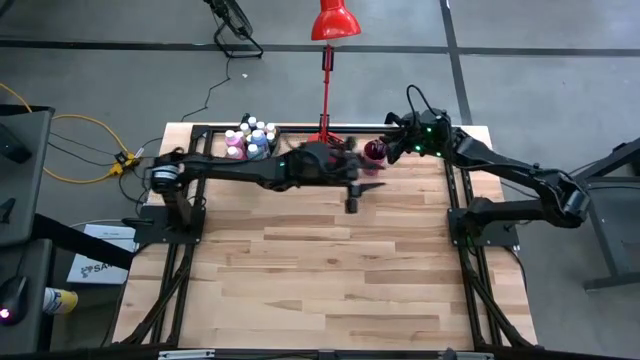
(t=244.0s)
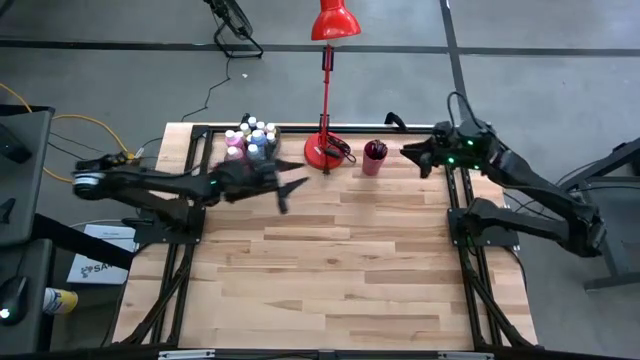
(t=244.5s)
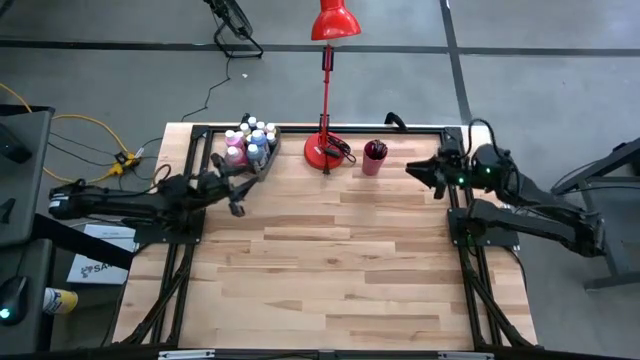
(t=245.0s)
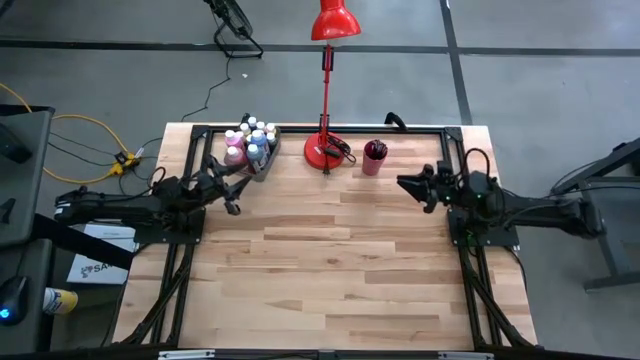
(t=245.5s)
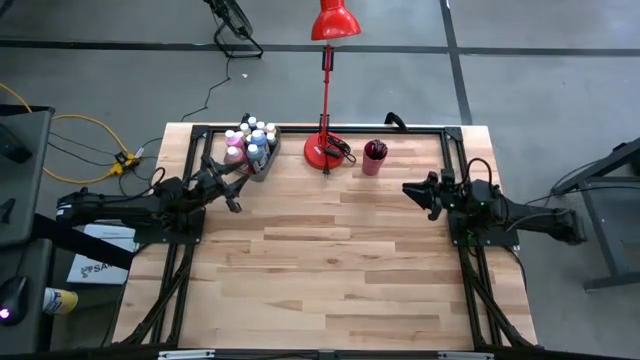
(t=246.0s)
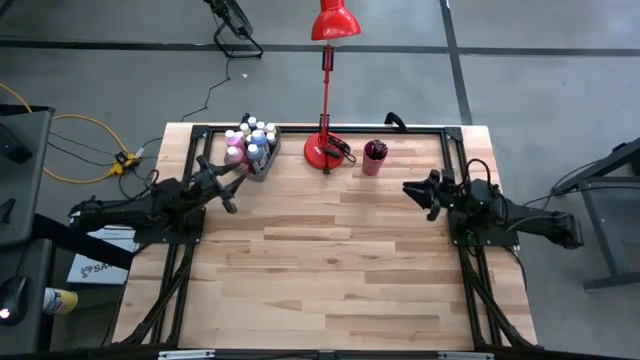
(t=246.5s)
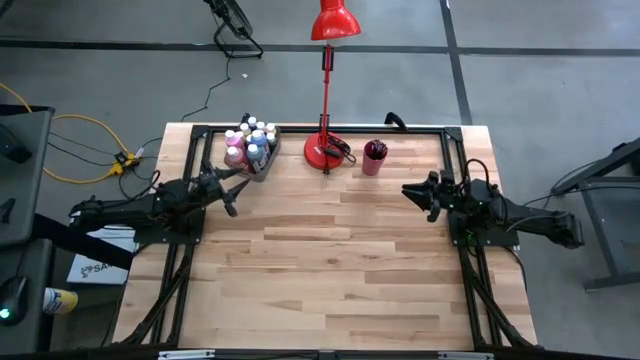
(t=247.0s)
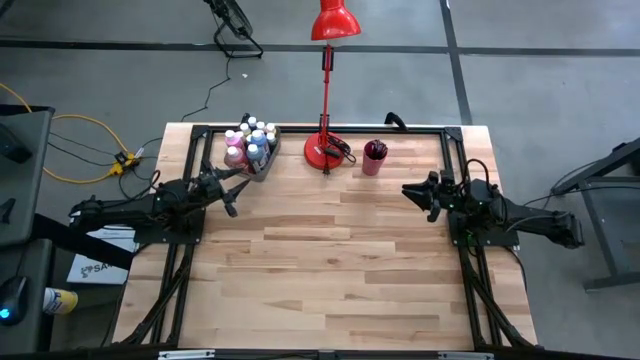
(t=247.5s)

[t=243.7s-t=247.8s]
Task: Pick & Place Paint Supplies
Return to Home Position

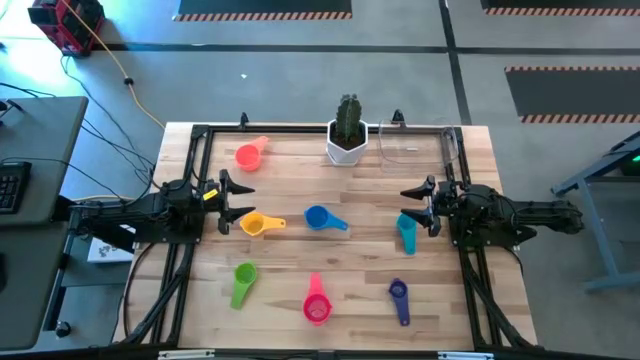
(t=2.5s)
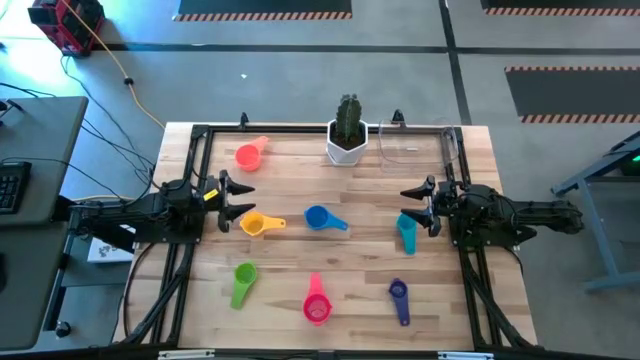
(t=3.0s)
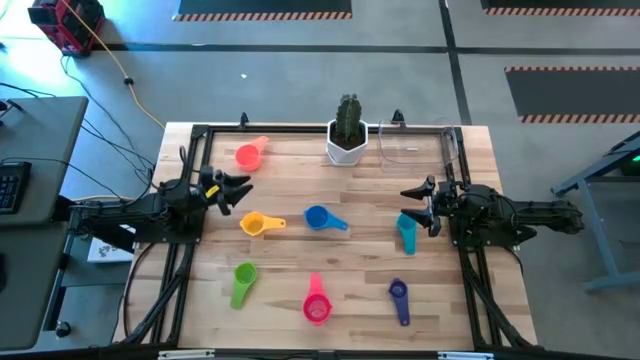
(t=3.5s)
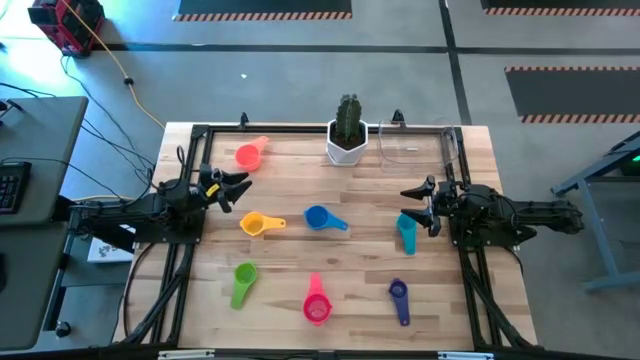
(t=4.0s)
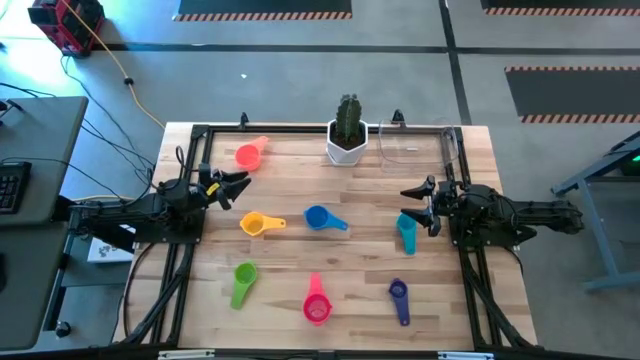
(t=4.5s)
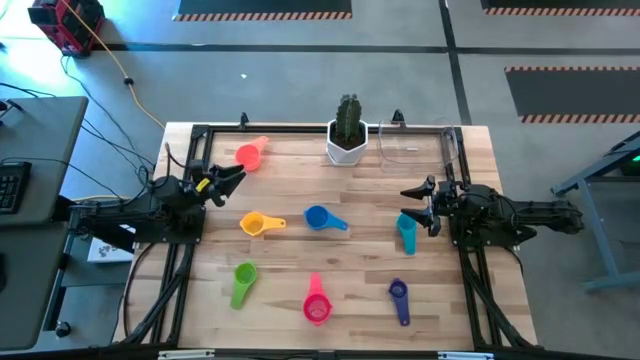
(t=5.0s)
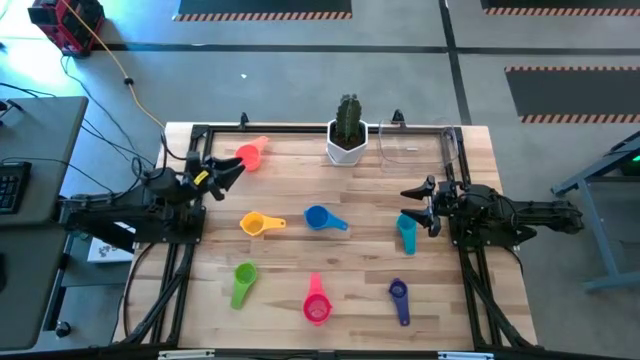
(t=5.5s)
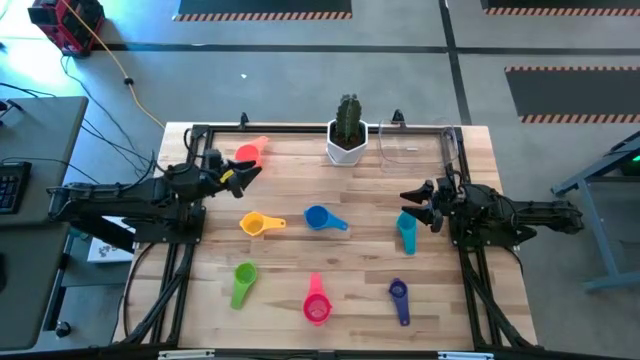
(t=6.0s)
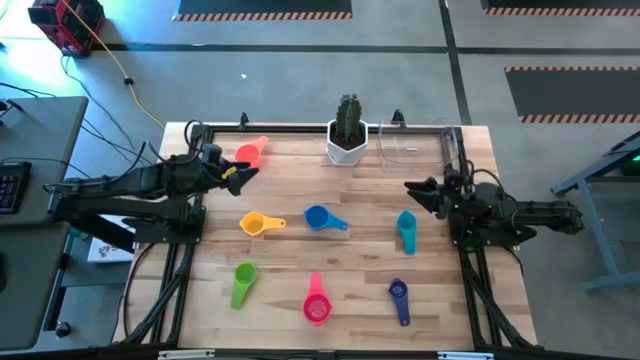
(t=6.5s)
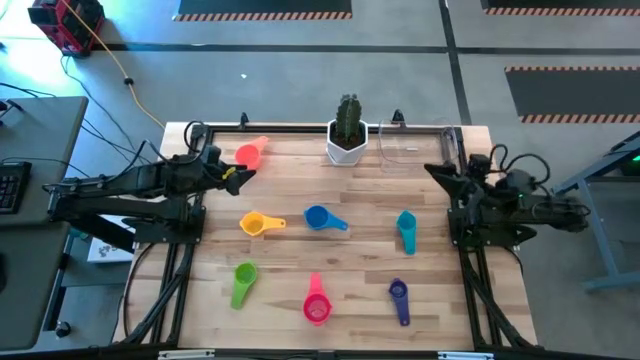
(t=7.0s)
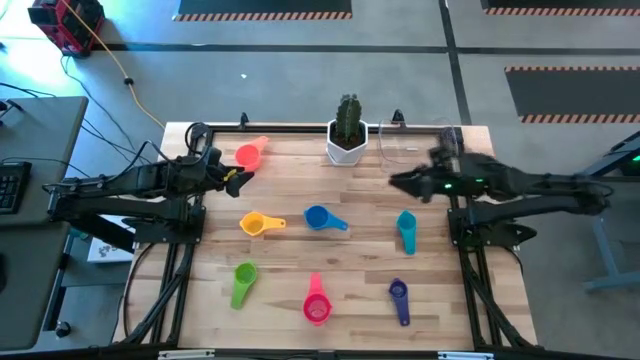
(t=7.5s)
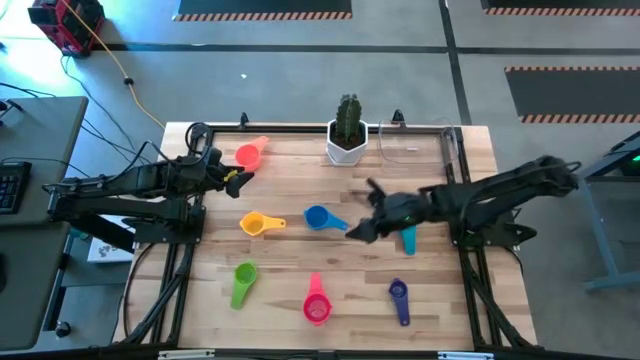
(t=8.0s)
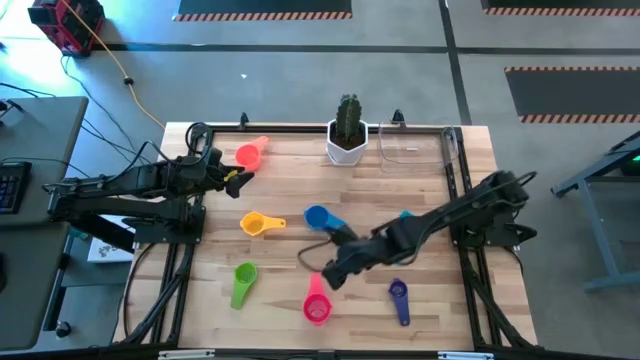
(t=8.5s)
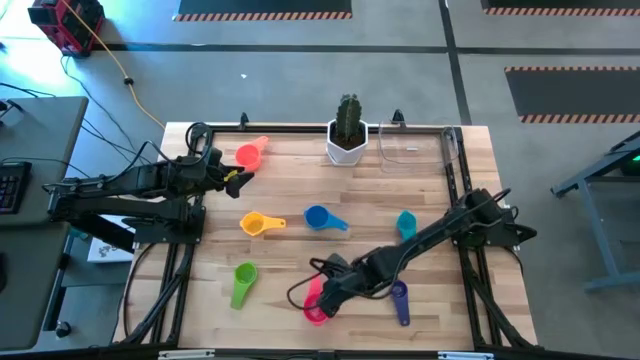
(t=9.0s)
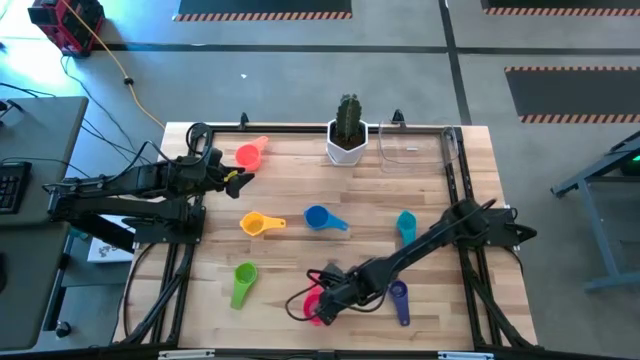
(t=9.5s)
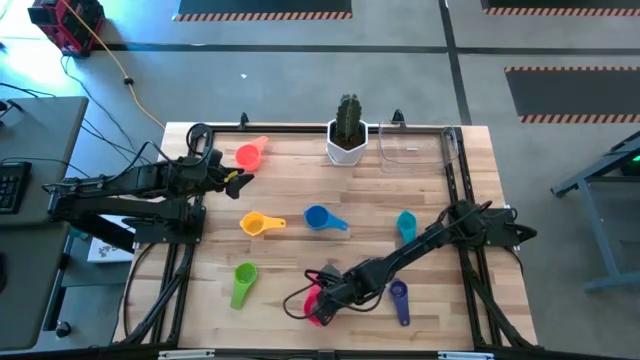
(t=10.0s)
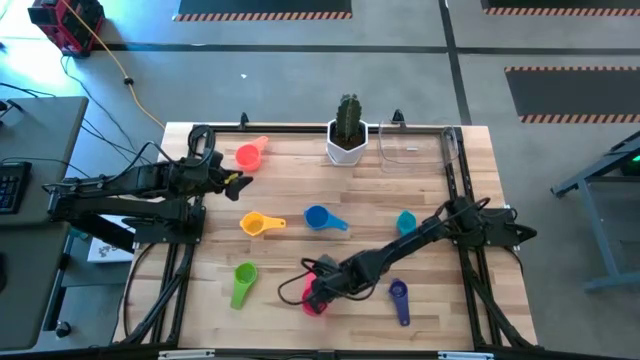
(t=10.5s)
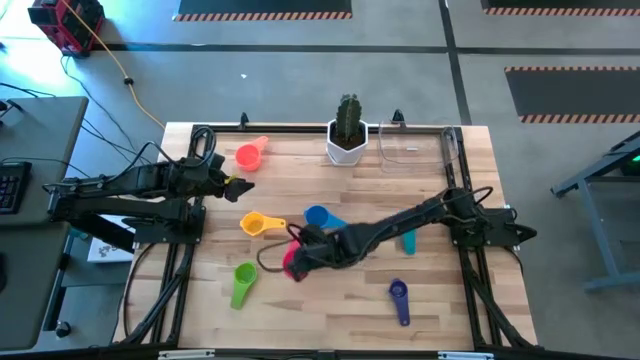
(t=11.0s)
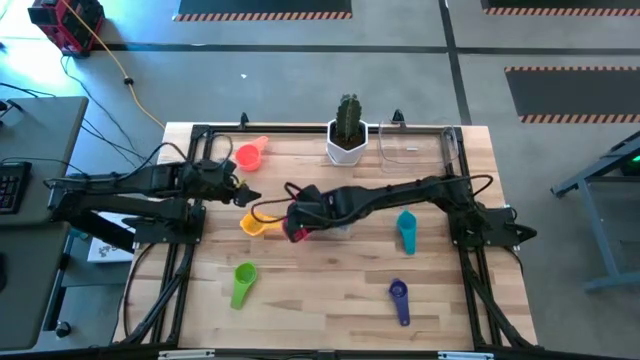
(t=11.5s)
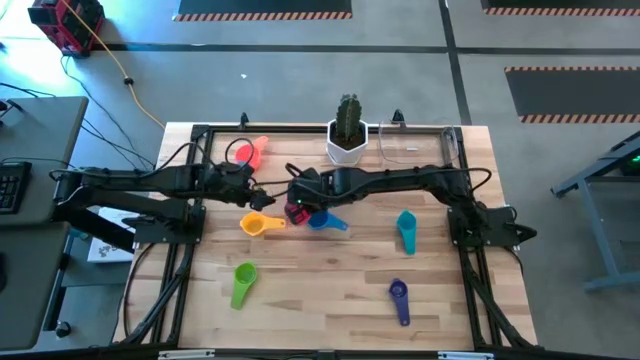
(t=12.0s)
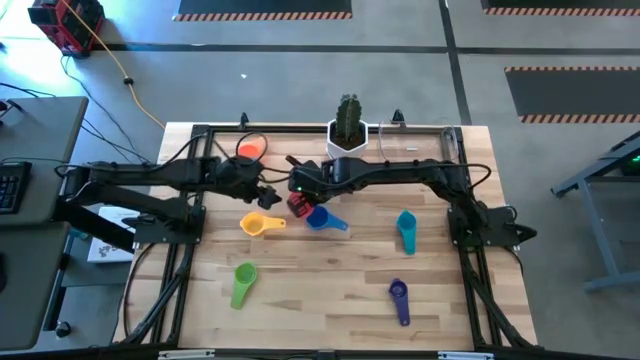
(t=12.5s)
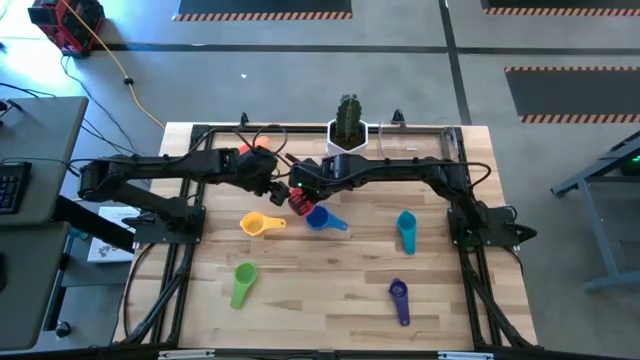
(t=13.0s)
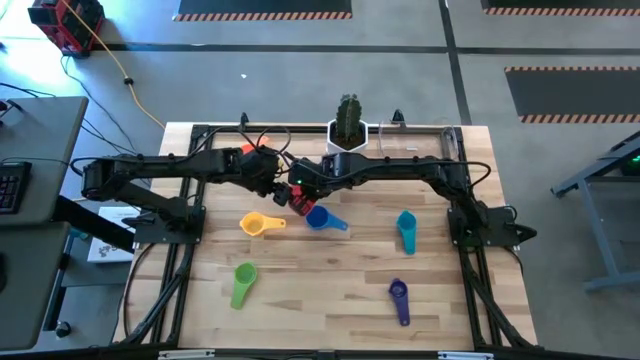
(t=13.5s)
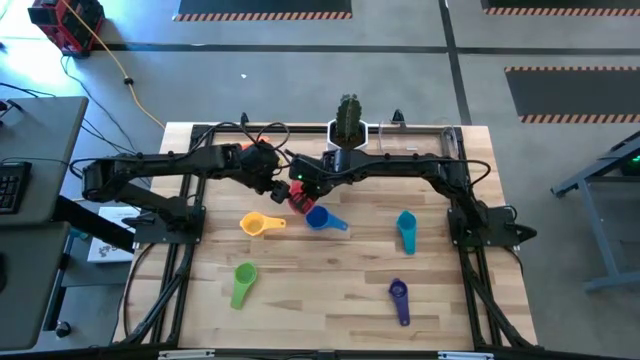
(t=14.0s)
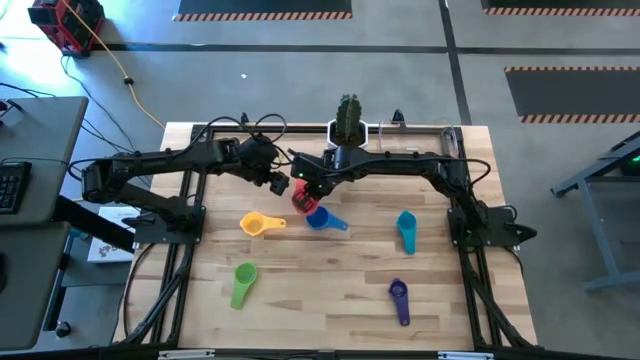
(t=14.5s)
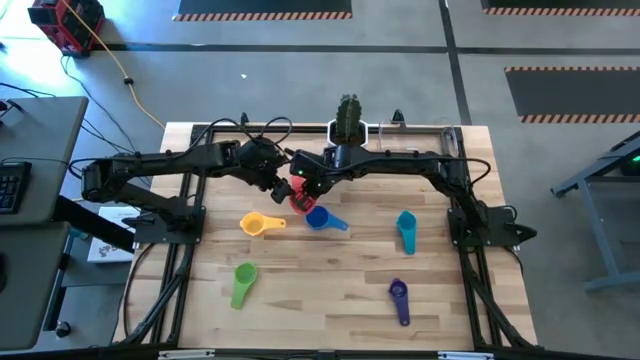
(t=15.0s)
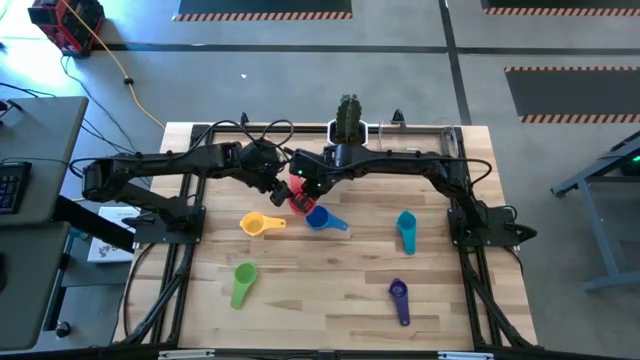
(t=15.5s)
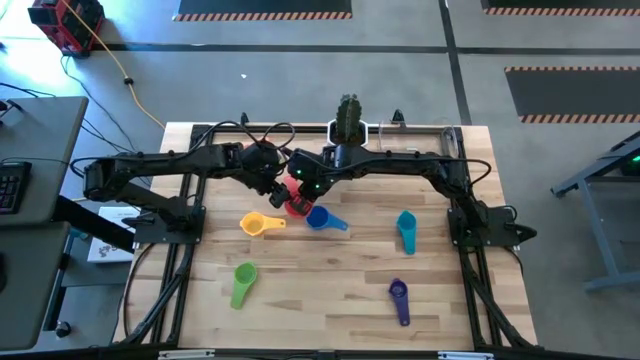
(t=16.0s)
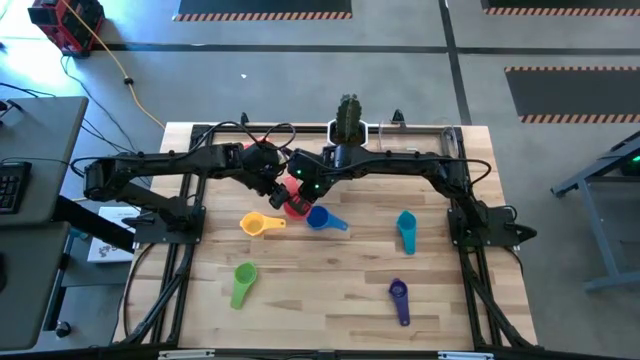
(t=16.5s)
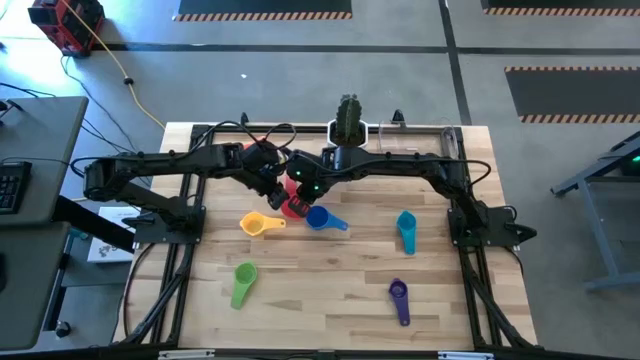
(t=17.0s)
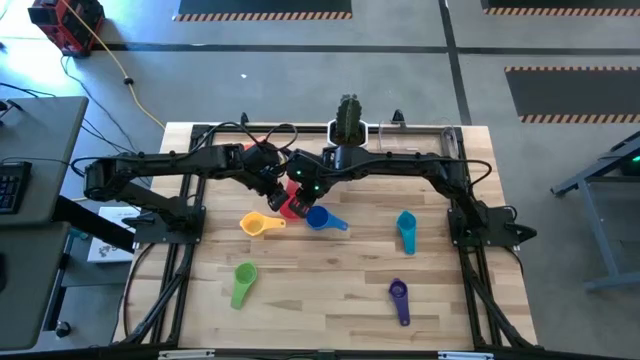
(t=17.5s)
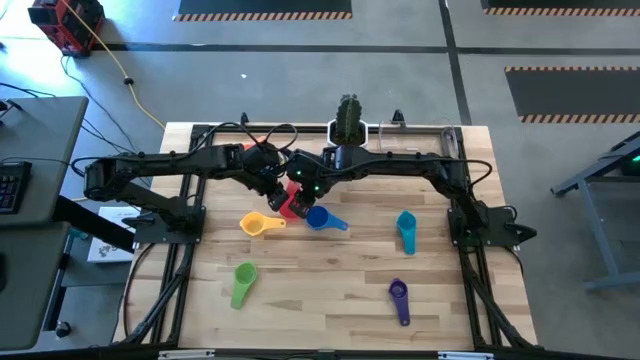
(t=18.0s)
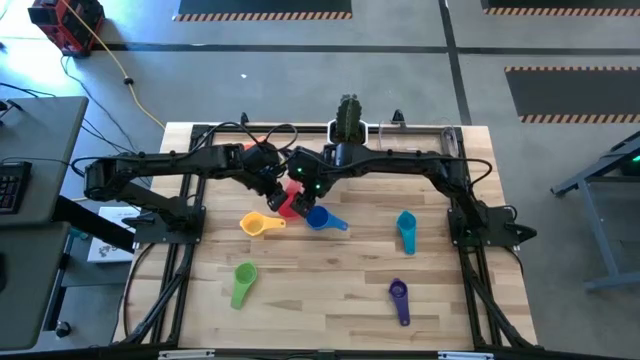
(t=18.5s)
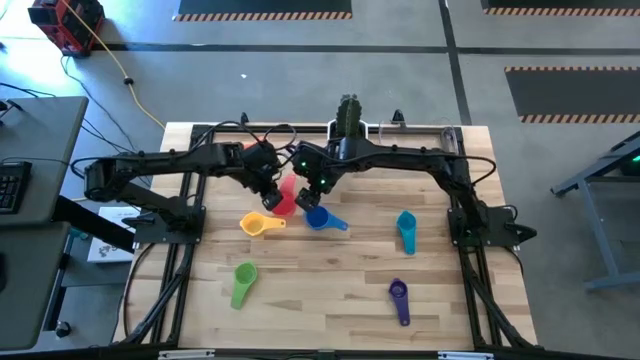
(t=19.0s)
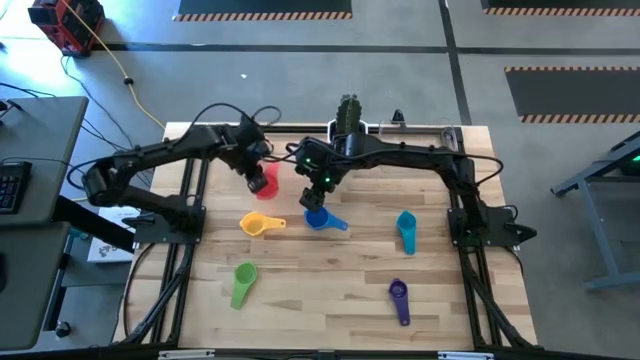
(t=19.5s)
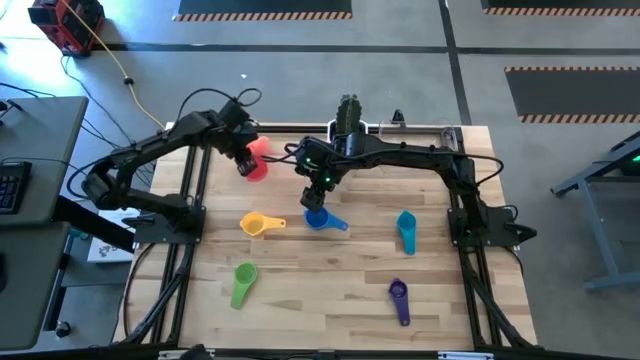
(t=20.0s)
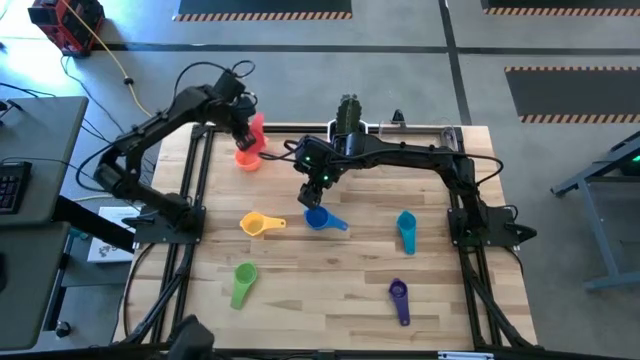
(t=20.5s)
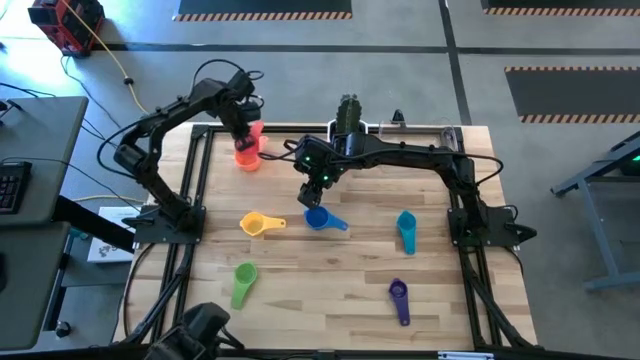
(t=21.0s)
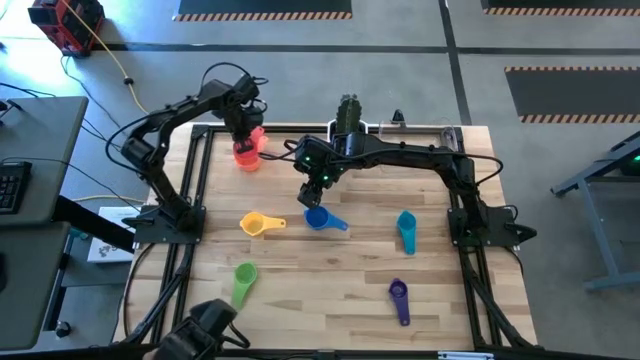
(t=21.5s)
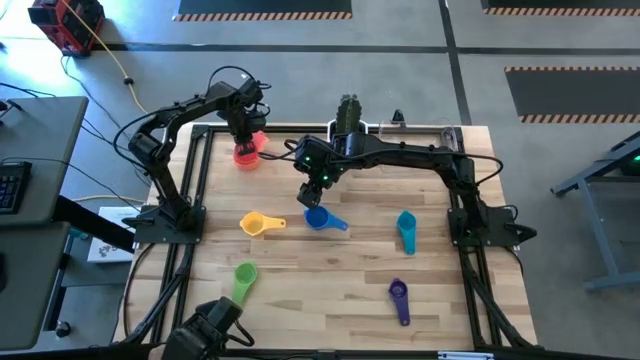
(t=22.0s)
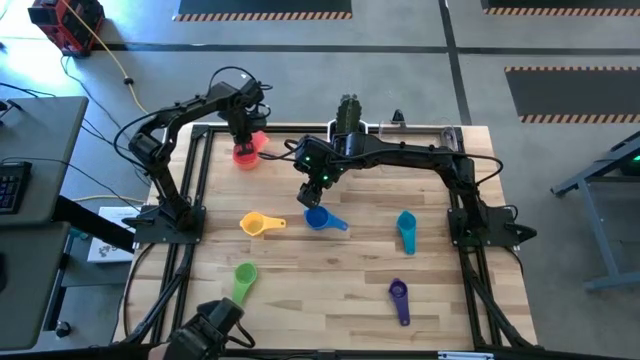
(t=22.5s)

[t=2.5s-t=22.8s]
Task: Nest measuring cups in basket
Stack the red measuring cup on top of the orange measuring cup
